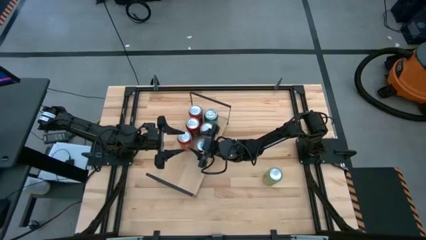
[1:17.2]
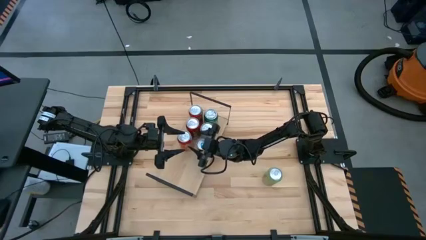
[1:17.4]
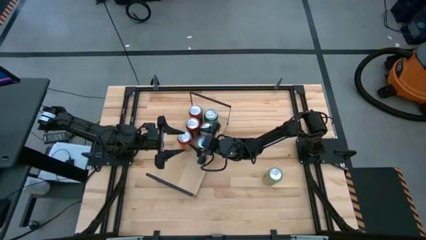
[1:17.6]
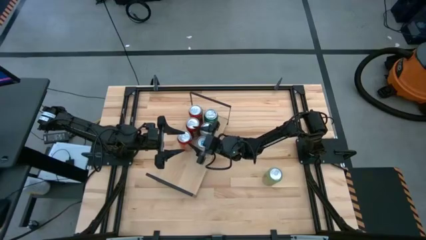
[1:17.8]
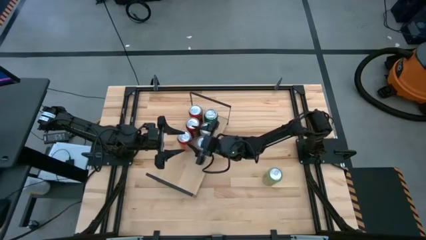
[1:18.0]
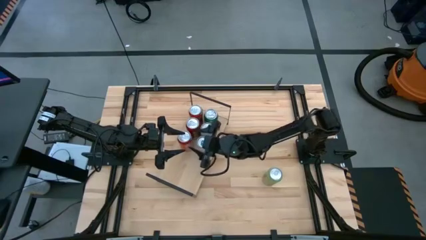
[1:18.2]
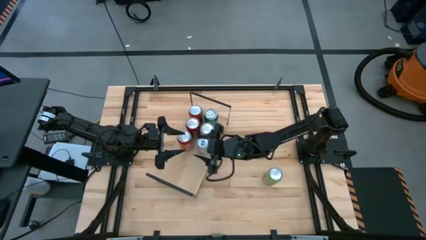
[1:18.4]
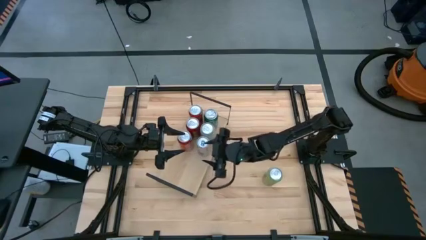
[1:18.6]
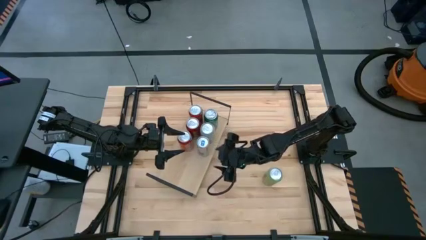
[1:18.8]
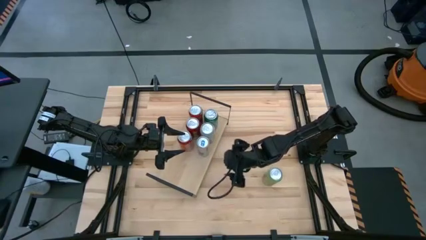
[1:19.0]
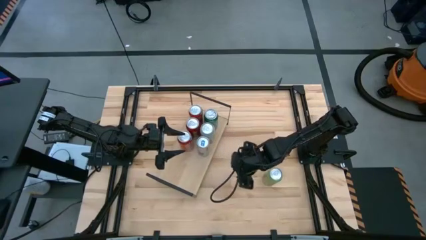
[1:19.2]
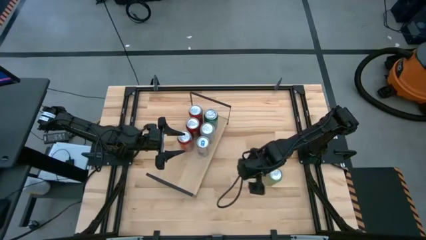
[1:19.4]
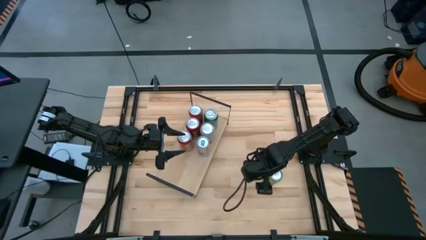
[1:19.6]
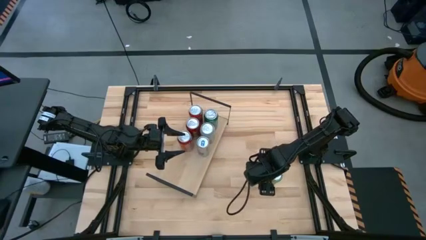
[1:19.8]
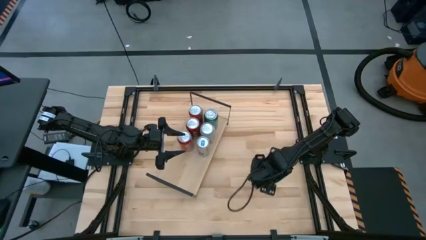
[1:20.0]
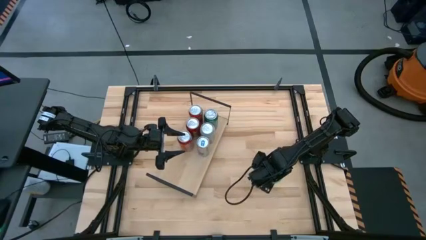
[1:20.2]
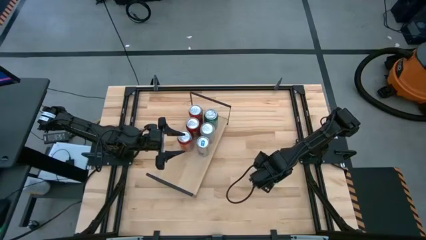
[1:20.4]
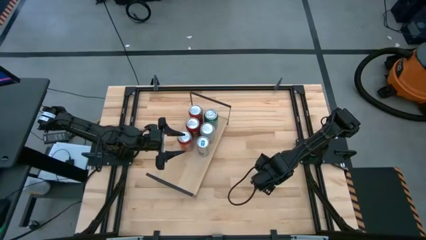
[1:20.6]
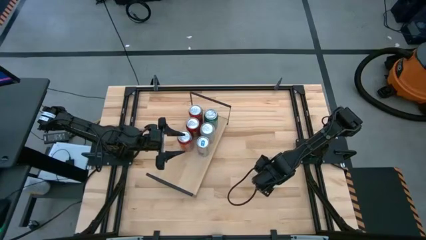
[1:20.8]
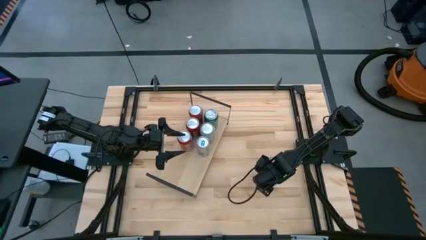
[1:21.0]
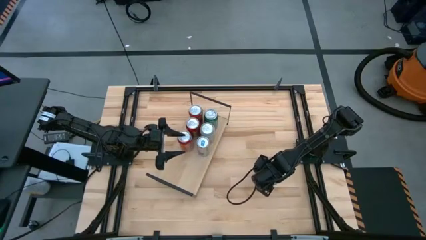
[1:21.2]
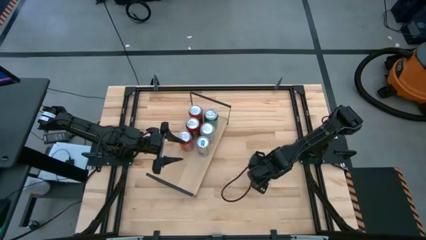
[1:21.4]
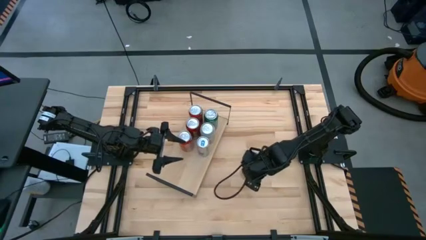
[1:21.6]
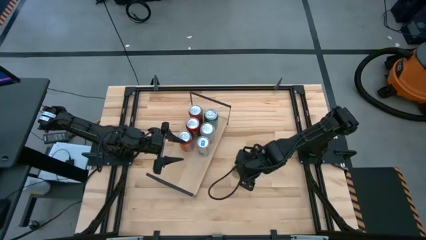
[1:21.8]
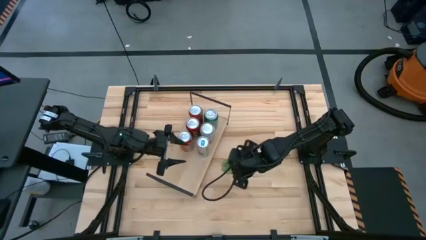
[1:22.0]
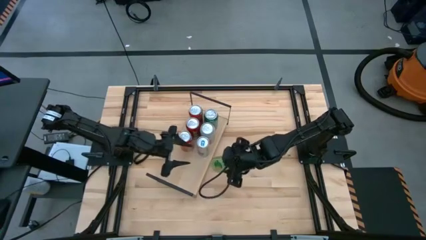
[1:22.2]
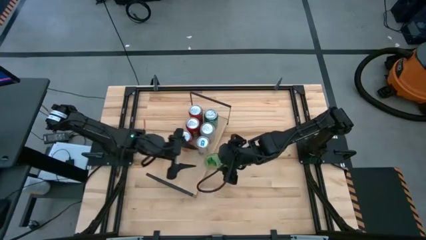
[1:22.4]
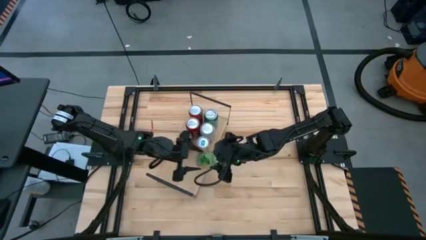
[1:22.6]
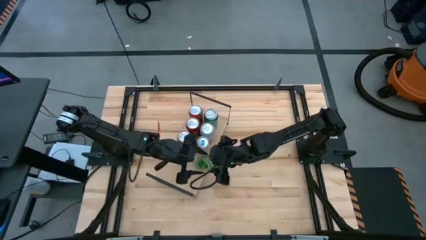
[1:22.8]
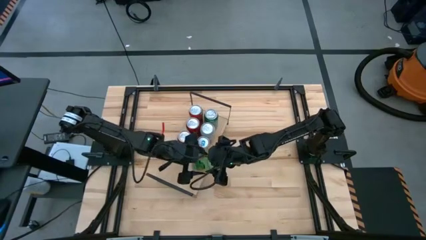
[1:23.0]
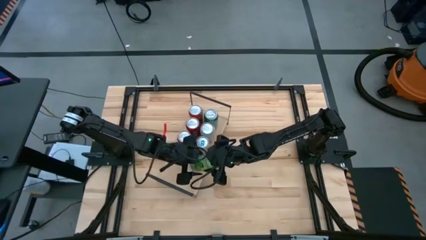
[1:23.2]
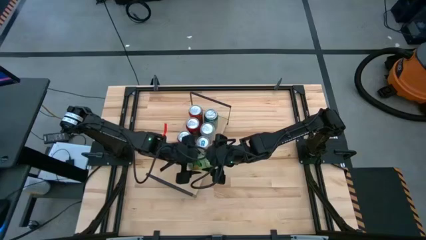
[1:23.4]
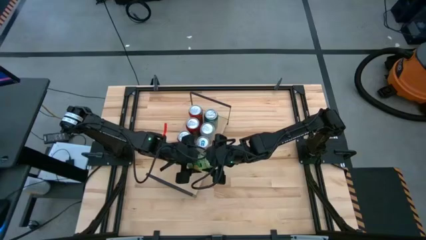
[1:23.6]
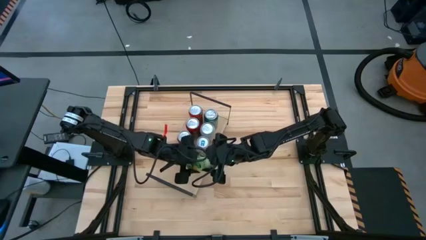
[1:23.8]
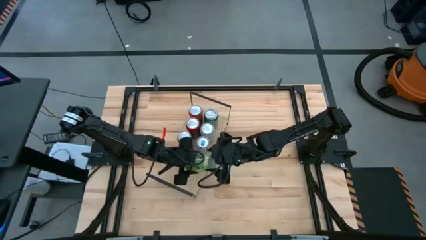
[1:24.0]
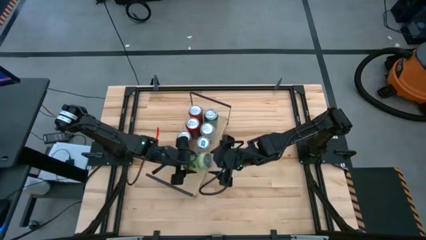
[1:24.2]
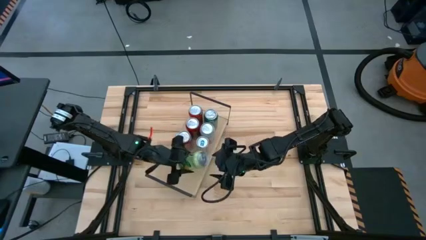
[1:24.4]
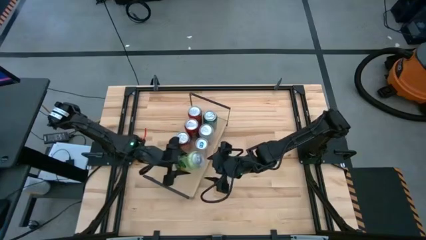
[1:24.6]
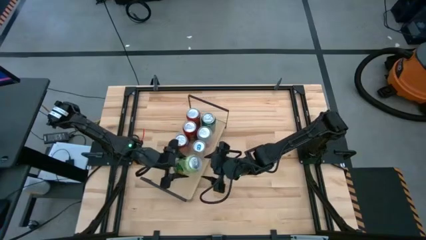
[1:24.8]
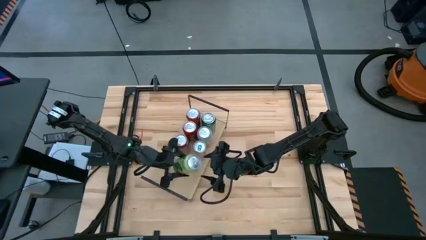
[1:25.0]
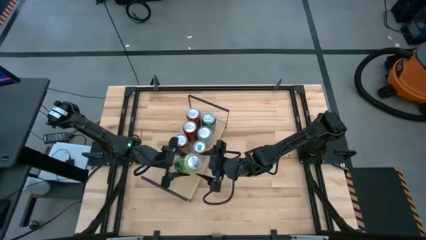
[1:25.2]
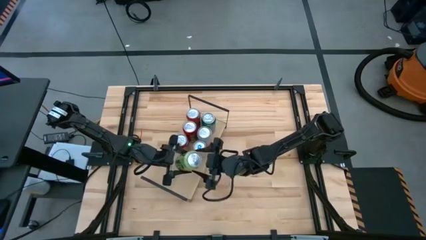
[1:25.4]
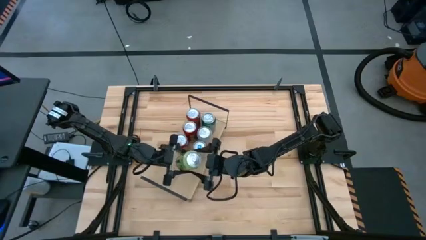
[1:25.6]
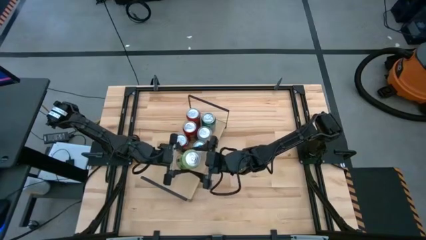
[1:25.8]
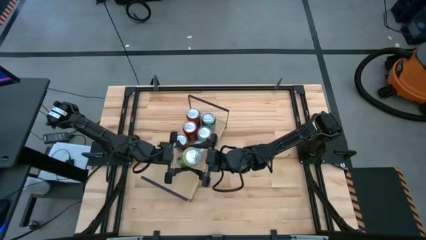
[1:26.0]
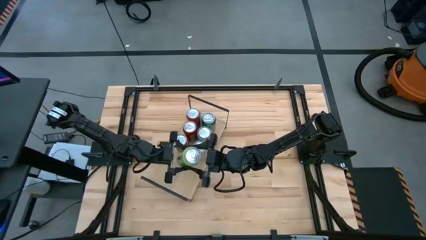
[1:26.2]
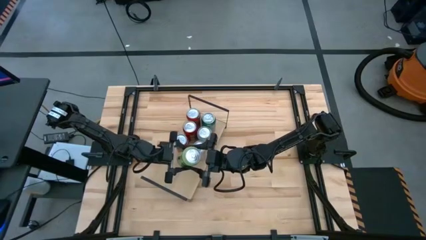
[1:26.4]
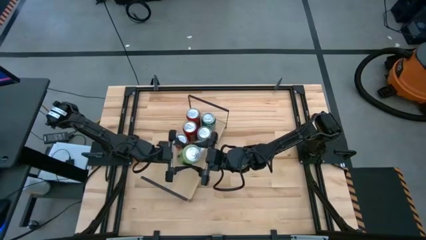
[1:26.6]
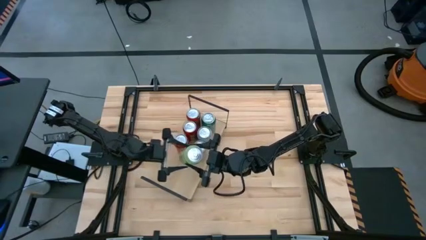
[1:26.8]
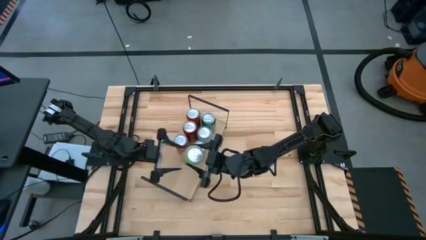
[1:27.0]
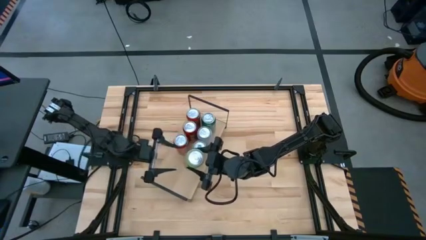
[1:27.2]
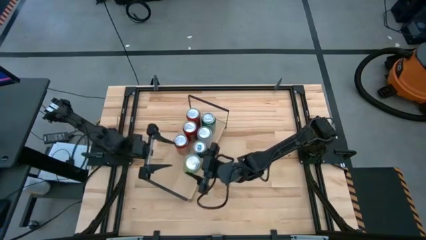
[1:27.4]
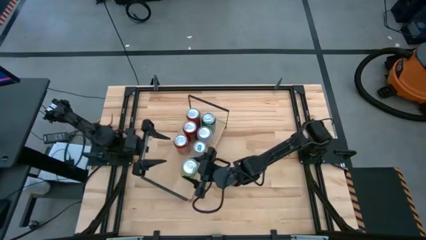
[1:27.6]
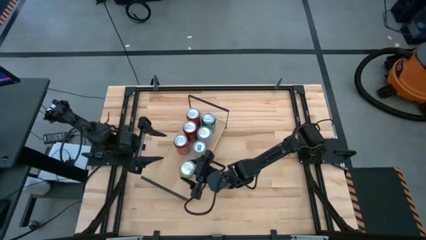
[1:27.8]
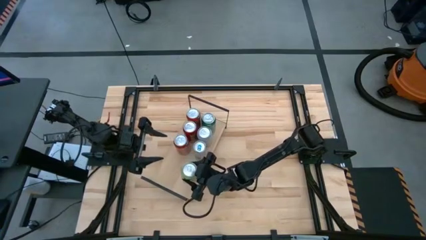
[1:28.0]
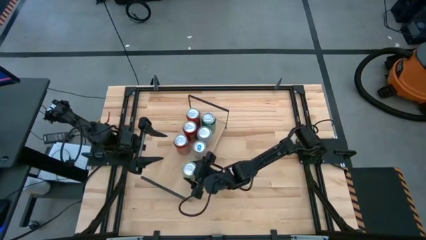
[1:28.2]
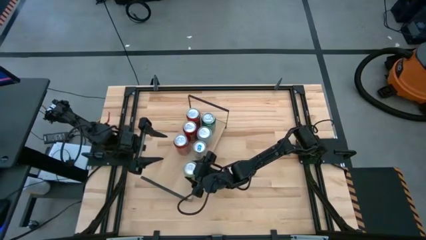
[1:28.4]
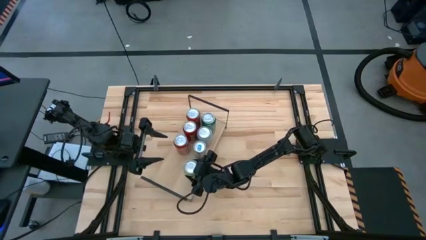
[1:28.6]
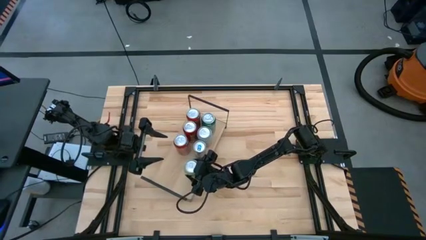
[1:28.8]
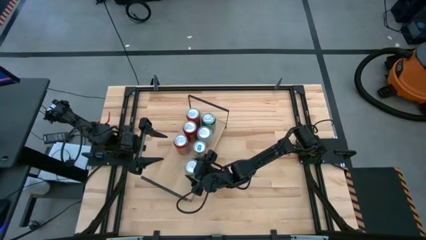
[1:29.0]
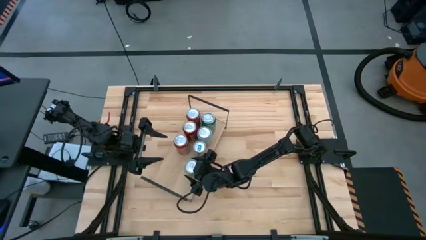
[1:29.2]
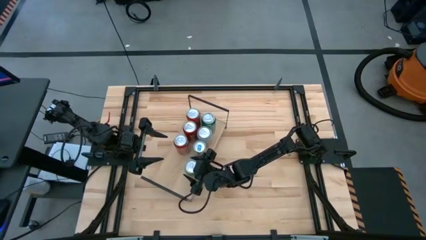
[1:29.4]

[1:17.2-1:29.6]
Task: Place canned beverage on shelf
Put the light green soda can on the shelf
